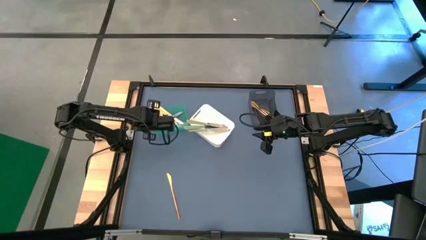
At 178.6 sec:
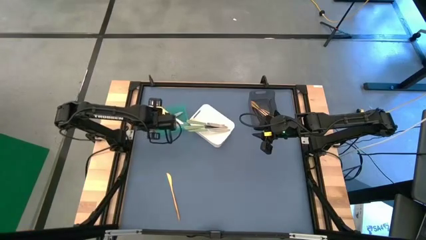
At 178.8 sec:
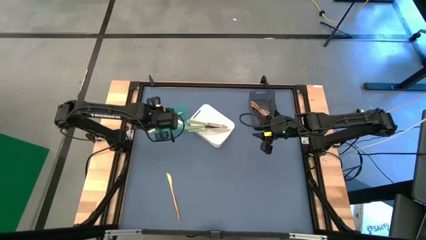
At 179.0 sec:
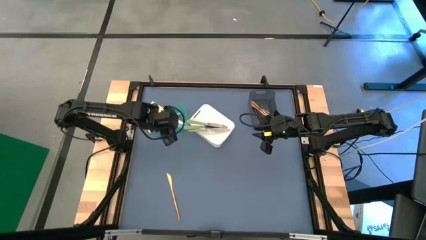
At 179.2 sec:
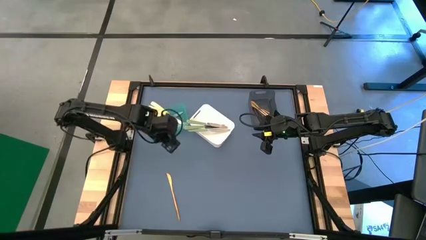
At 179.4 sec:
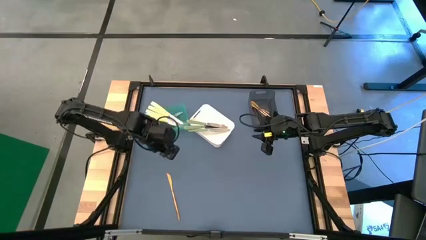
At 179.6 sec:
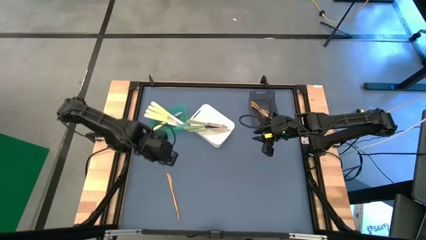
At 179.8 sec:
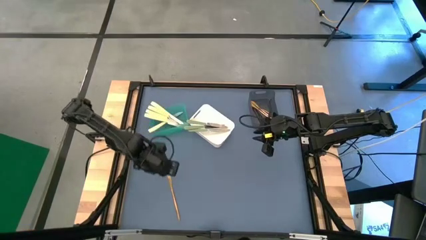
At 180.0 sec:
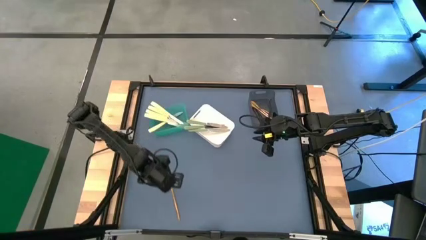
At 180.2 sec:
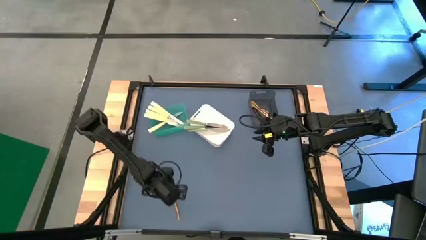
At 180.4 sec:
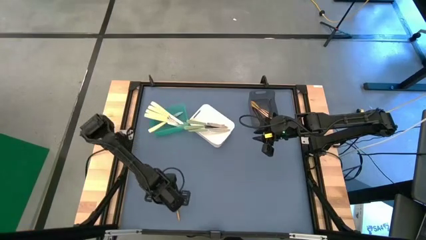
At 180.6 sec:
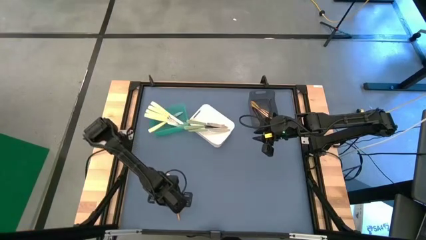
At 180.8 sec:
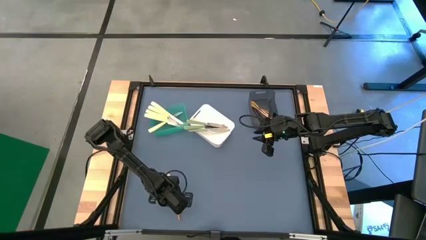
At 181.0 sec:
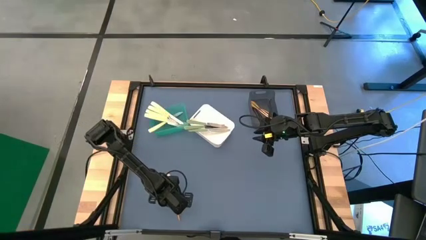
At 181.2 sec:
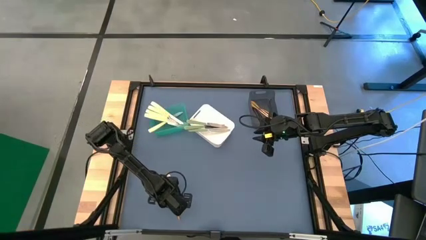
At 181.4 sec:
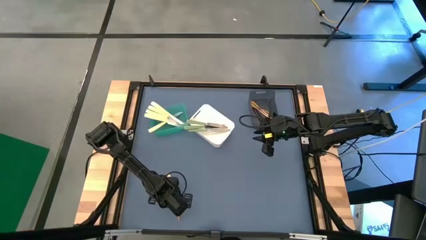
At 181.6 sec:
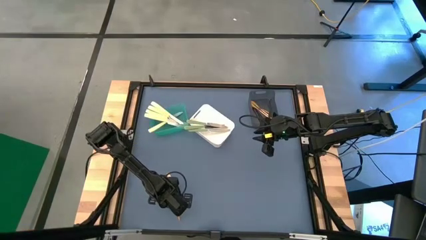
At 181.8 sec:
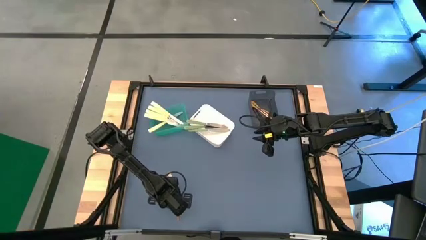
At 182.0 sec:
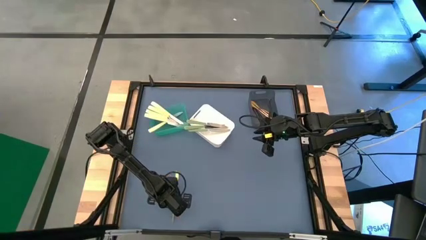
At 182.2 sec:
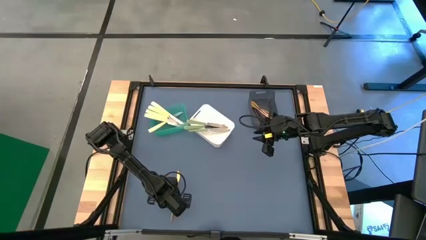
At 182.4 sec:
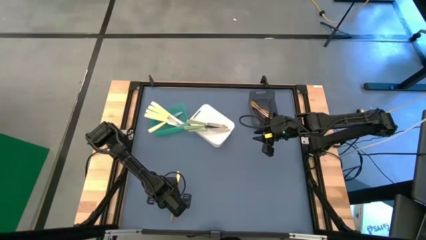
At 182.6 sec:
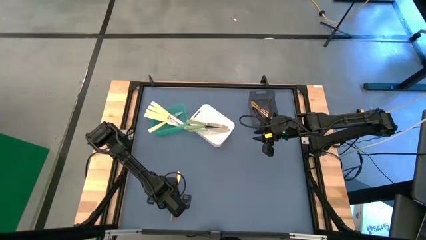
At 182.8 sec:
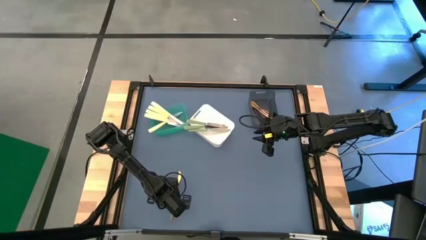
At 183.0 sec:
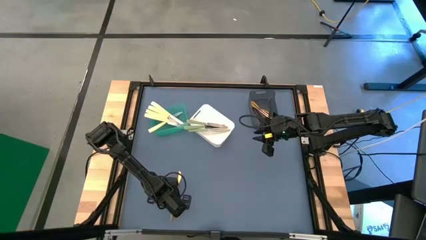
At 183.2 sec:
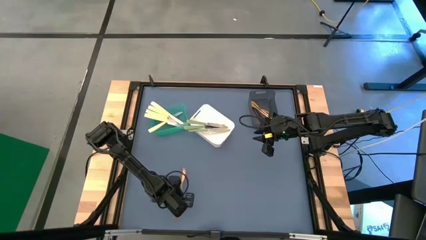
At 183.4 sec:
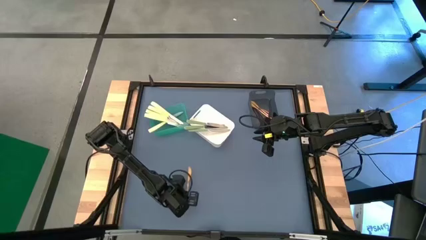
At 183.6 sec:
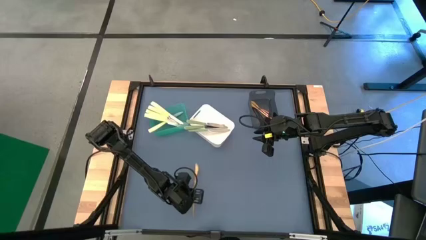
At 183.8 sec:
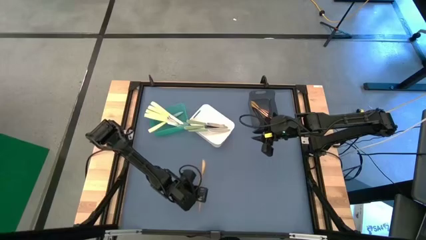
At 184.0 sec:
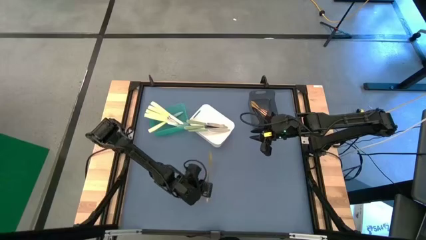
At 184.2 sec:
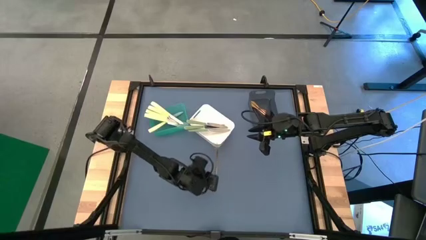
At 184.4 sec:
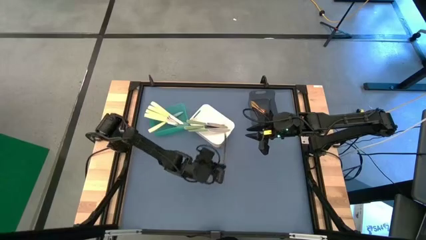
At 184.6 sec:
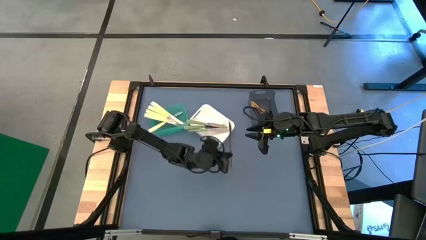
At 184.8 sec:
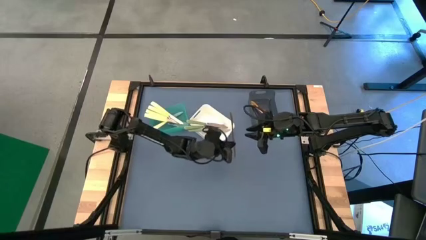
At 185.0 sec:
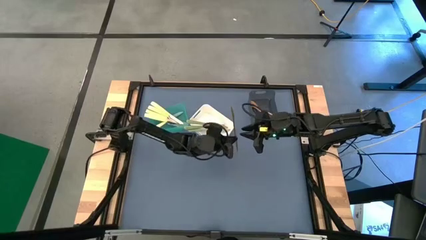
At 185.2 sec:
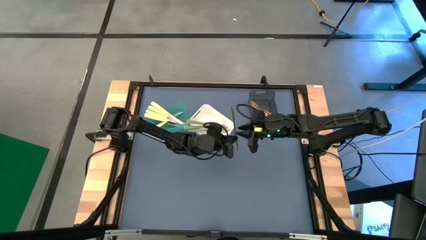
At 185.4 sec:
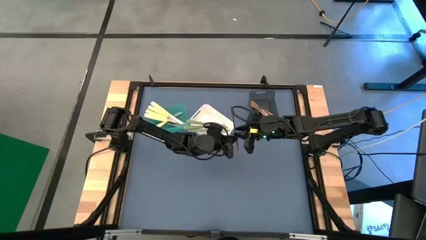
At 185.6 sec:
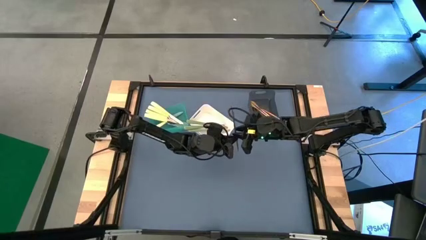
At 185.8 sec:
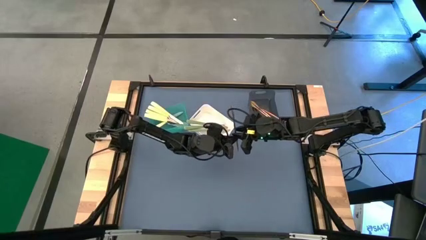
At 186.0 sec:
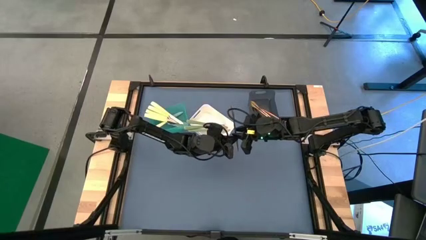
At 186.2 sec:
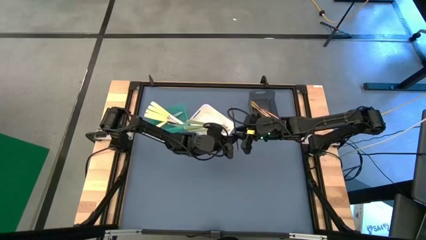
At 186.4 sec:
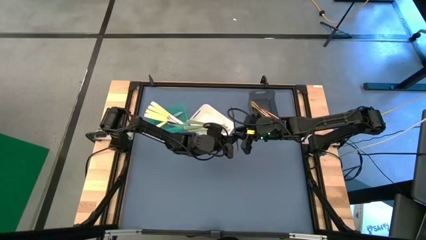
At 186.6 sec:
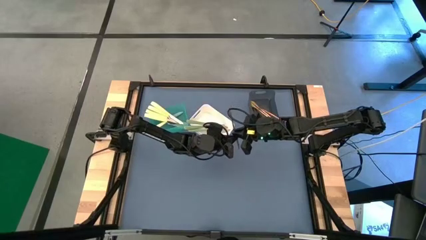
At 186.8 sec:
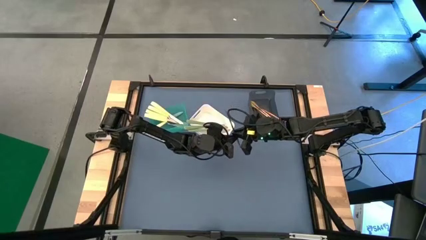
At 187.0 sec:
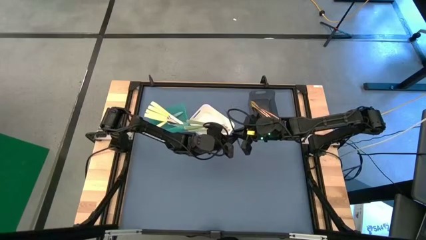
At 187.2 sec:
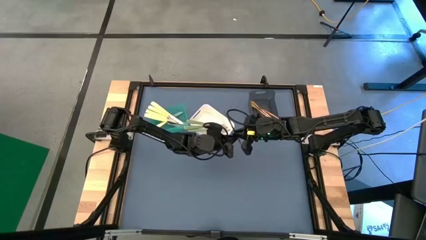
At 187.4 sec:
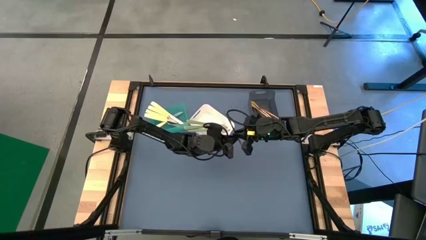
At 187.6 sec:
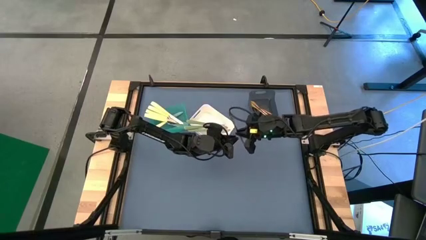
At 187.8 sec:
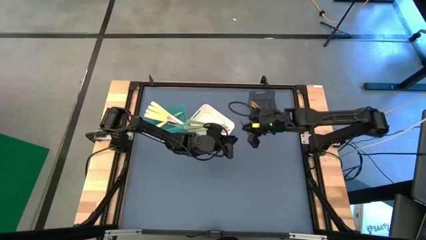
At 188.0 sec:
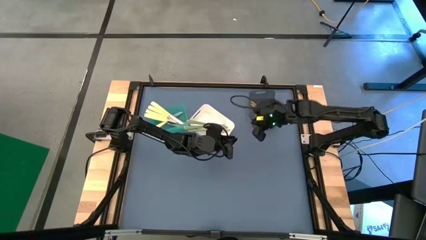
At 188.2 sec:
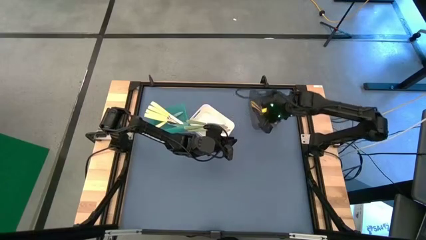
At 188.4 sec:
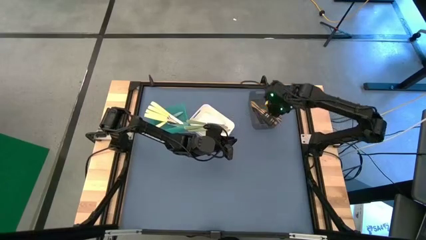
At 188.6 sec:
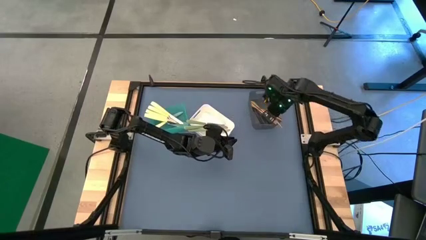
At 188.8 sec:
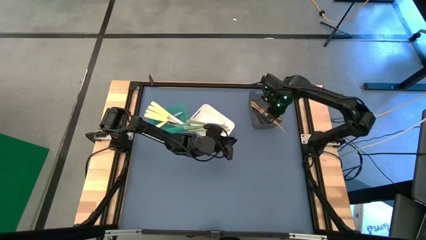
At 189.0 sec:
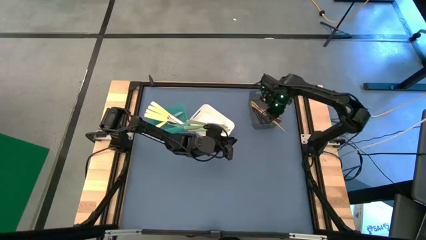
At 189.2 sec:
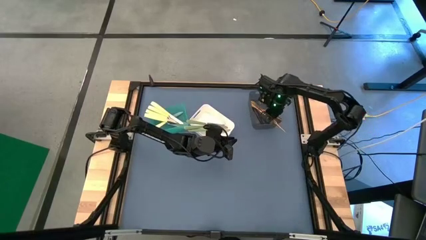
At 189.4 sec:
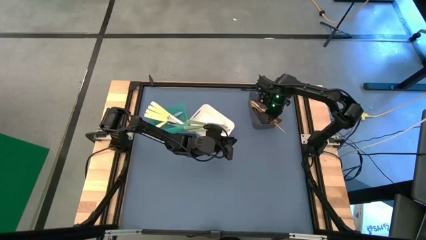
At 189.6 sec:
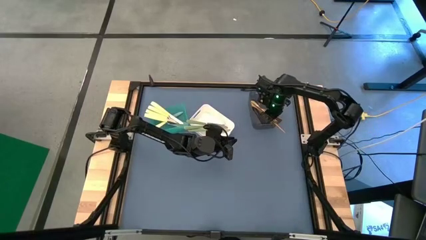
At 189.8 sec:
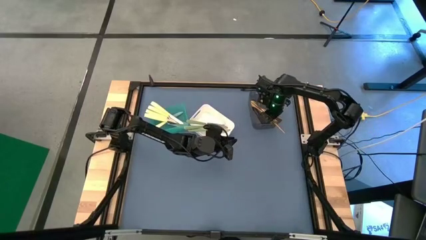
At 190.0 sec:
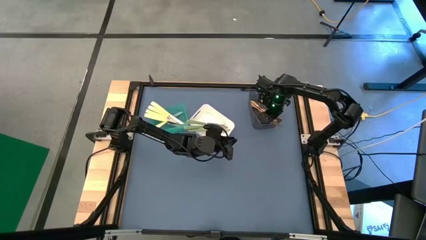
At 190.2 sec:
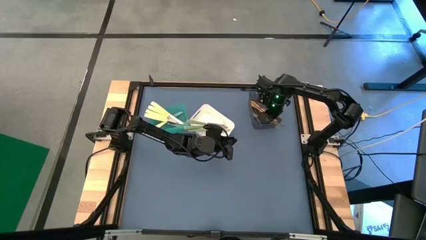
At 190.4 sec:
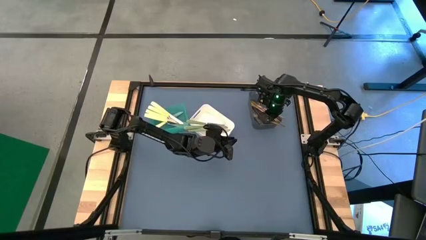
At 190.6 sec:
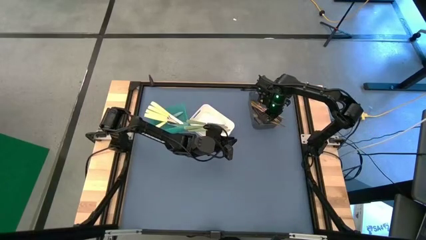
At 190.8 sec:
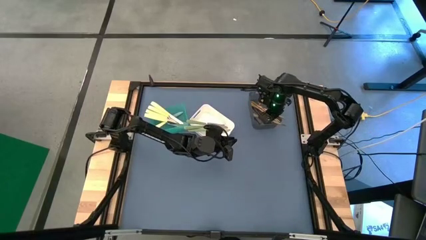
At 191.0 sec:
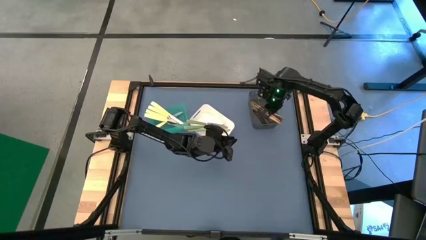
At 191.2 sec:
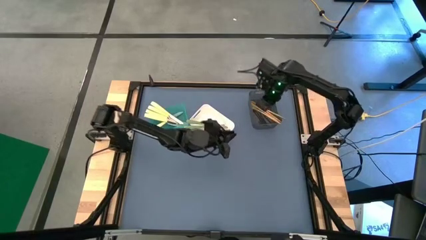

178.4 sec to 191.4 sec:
Task: Sort silverware by color (type)
Put the gold table knife into the black bin
